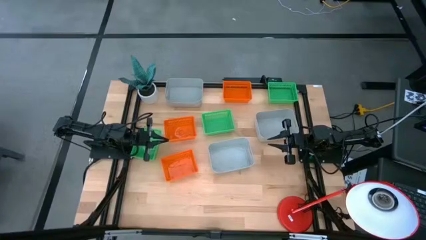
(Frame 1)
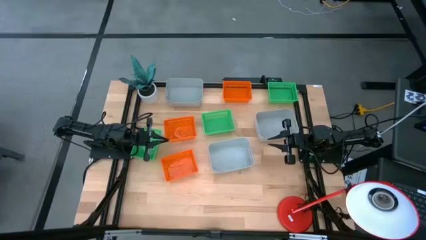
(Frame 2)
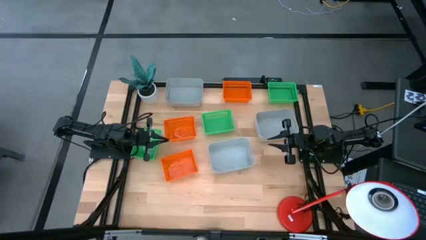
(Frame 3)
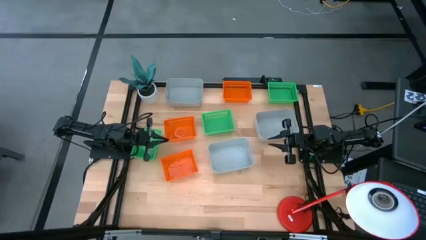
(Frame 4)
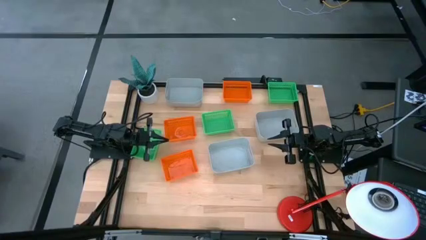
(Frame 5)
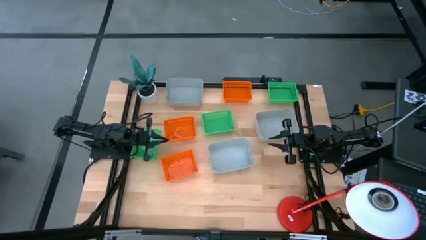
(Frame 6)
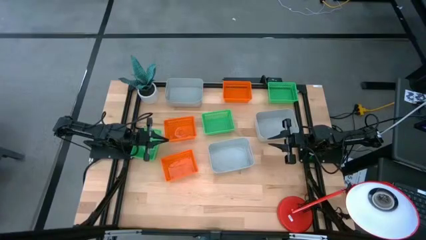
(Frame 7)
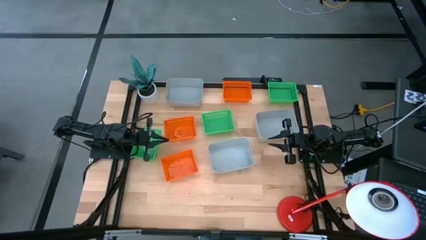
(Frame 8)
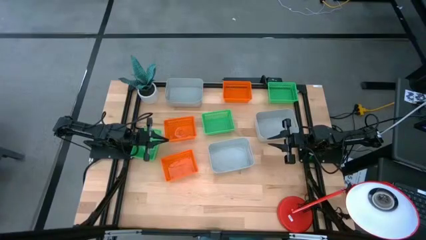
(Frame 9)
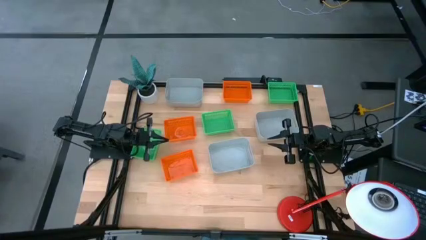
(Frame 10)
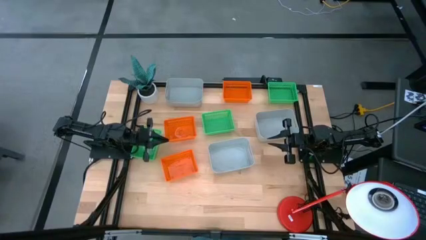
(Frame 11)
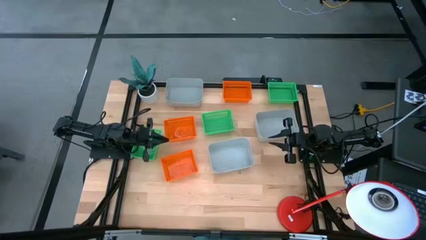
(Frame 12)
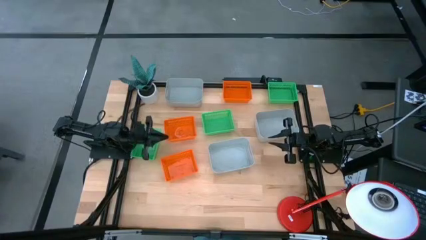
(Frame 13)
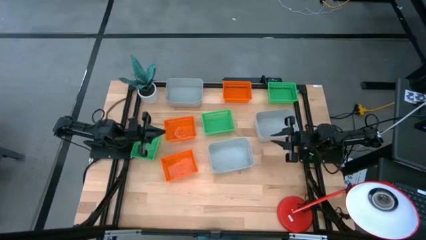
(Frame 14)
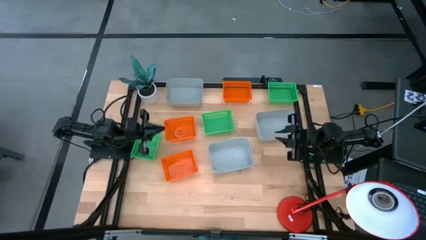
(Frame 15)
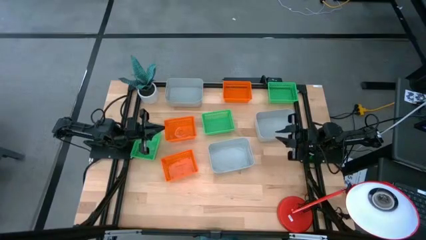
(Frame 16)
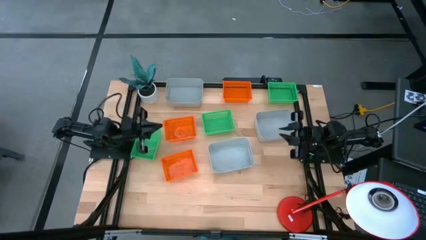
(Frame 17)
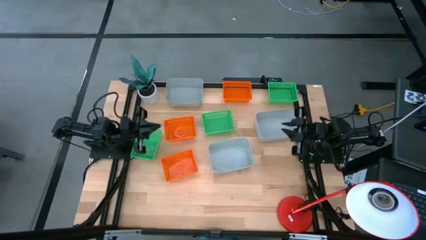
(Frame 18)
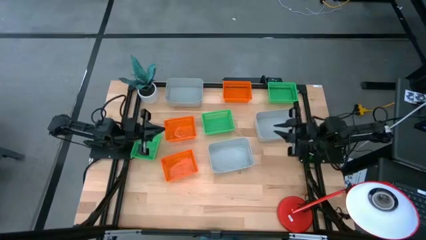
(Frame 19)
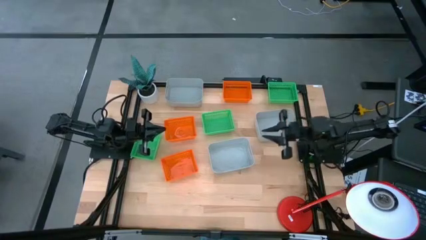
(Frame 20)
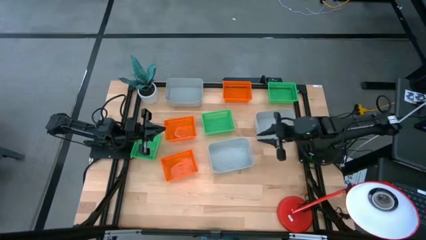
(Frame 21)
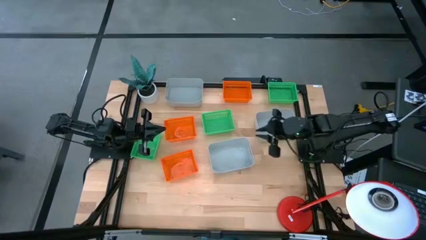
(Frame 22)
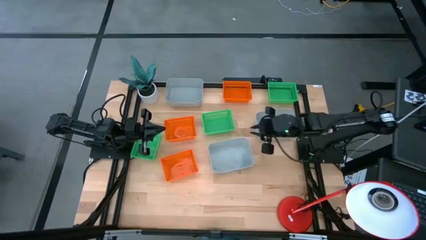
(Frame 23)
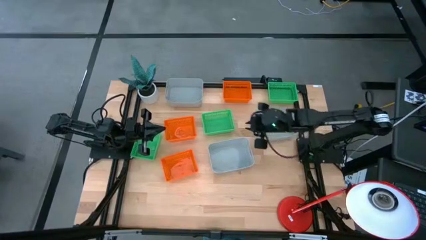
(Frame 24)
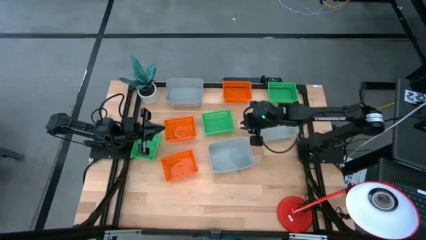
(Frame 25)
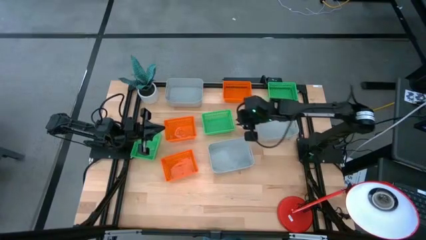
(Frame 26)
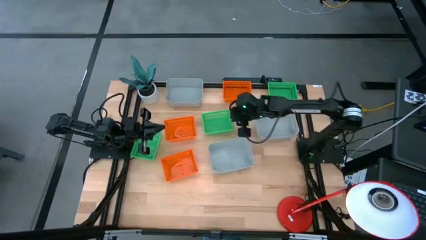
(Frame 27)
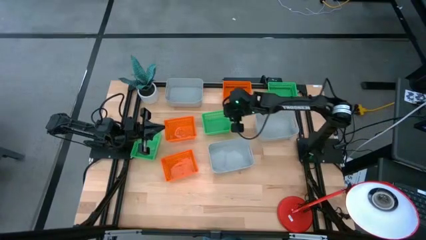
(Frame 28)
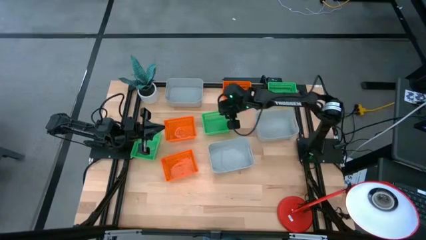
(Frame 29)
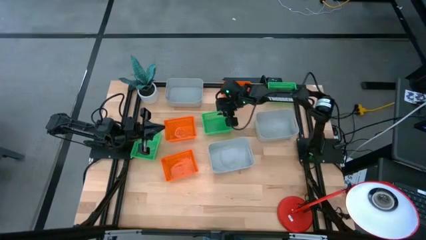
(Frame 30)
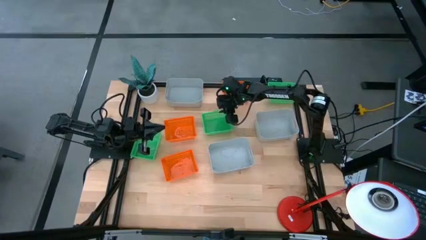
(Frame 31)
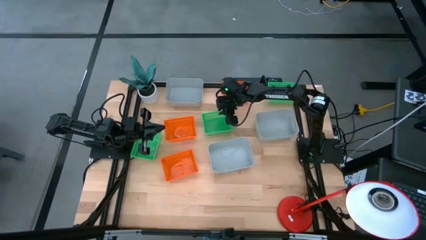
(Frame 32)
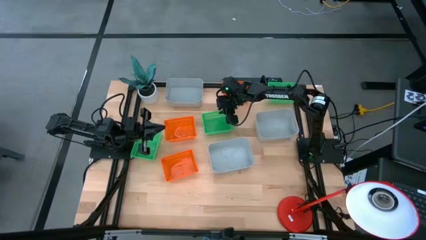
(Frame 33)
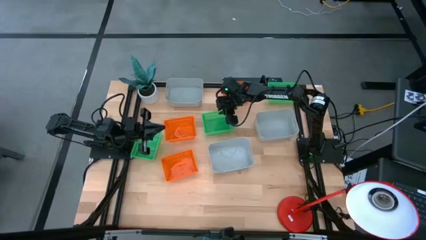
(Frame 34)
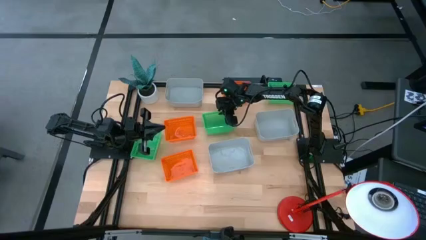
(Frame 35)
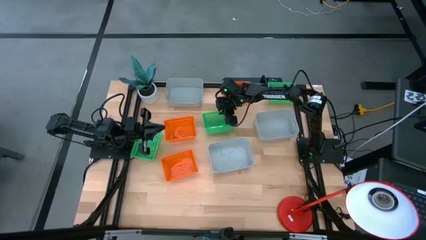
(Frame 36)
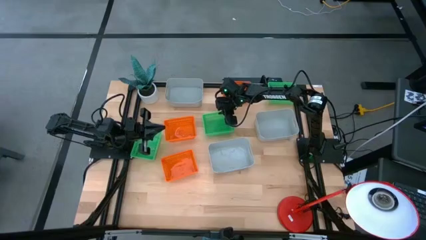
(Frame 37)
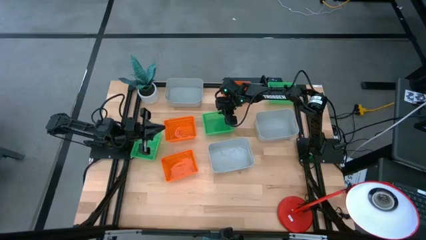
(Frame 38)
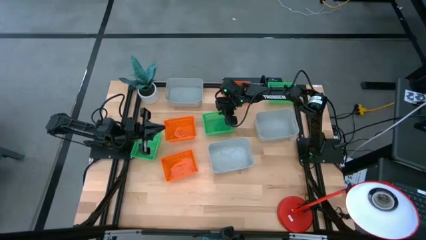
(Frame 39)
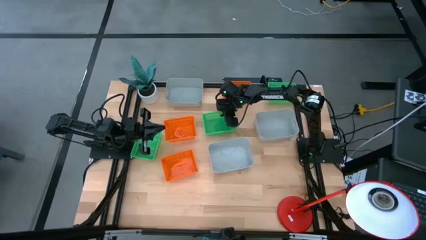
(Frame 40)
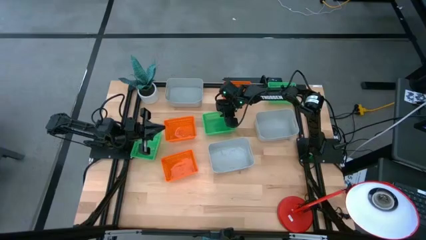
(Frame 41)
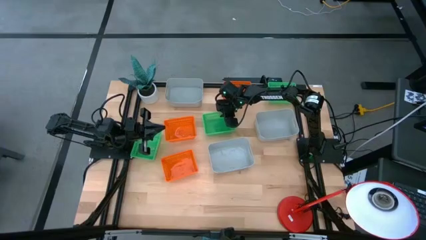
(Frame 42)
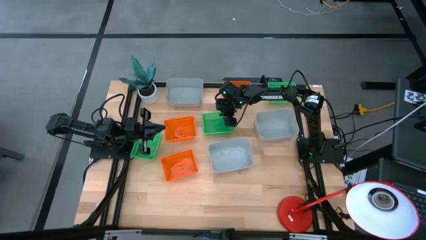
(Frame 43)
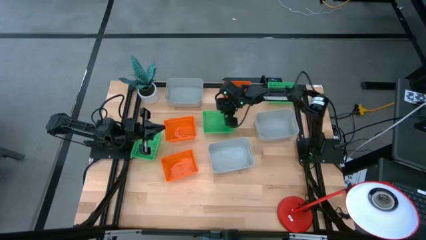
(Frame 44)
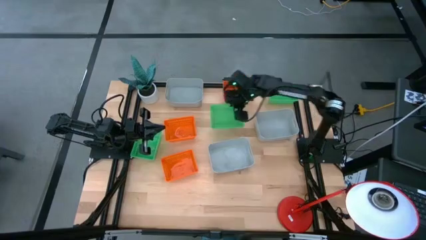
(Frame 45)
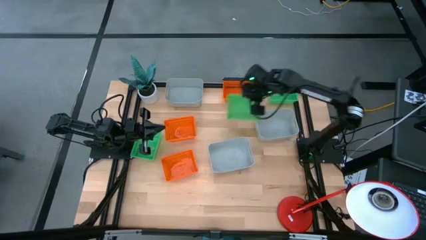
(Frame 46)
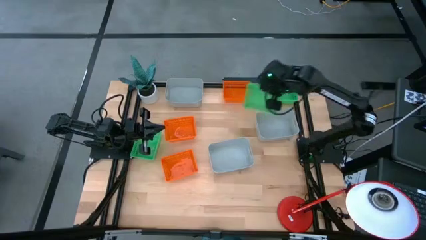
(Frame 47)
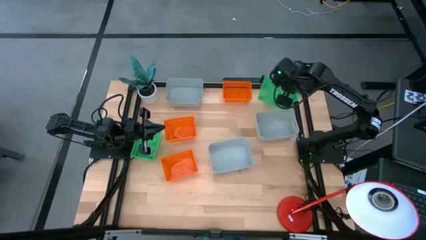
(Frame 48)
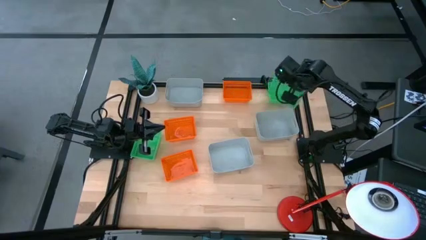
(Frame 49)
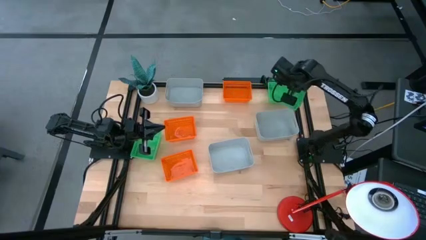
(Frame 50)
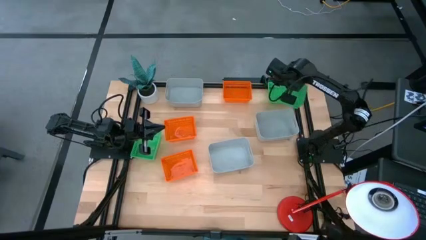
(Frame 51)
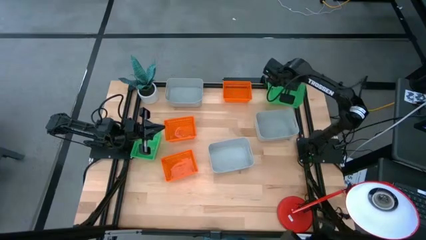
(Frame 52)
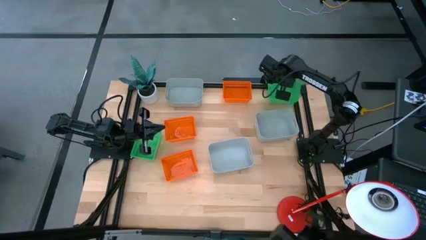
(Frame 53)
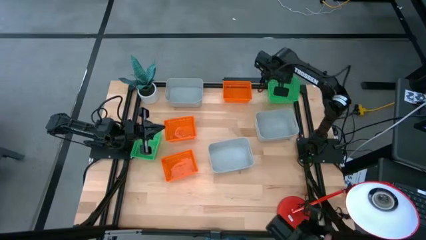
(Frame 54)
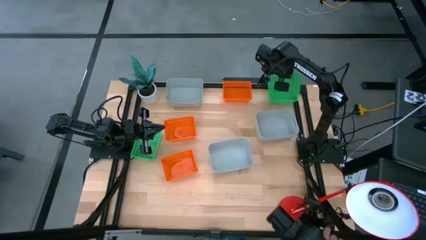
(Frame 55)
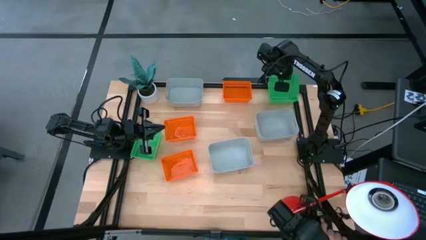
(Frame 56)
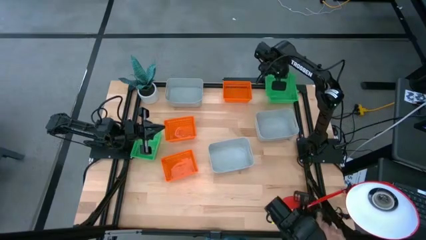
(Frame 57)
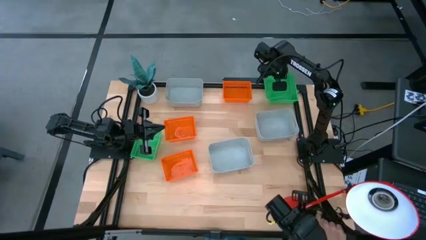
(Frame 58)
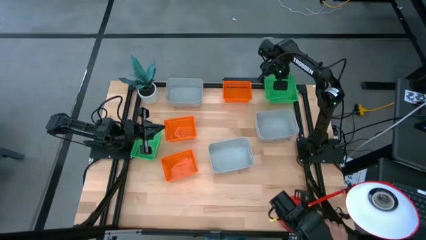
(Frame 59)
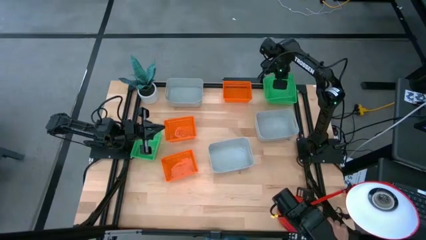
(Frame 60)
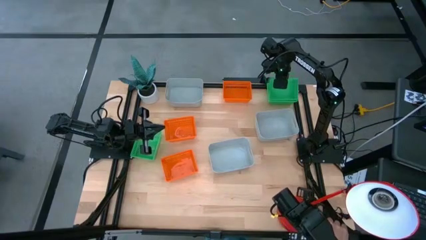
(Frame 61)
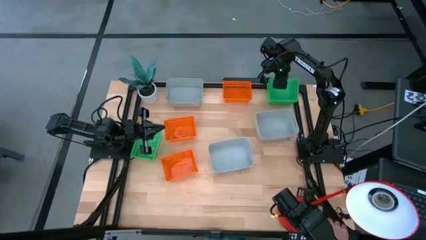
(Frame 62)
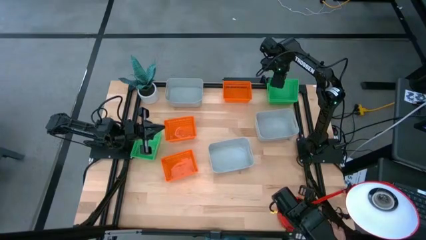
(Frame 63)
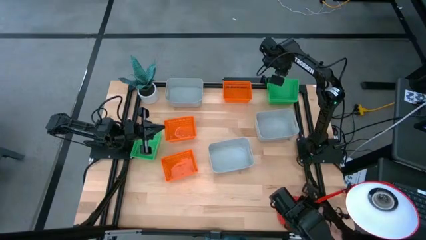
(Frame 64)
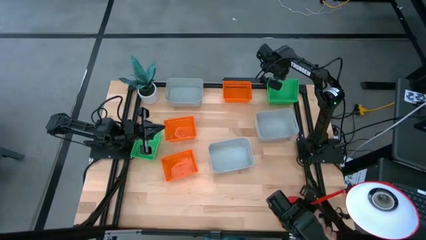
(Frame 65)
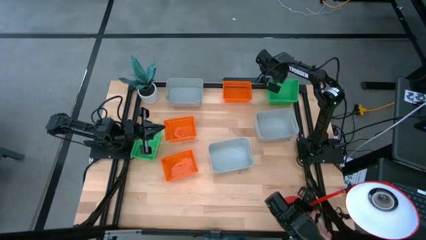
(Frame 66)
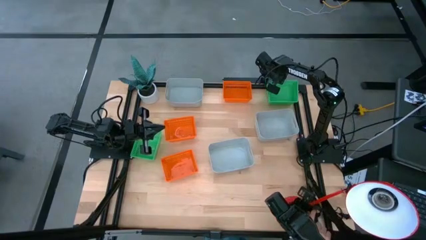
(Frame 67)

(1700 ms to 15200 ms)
Stack the middle green bin on the right green bin
